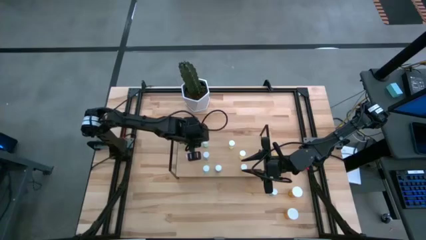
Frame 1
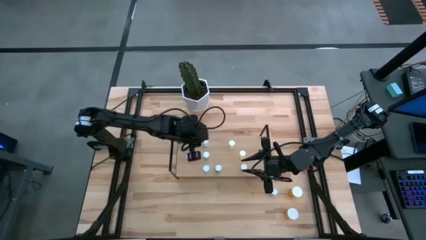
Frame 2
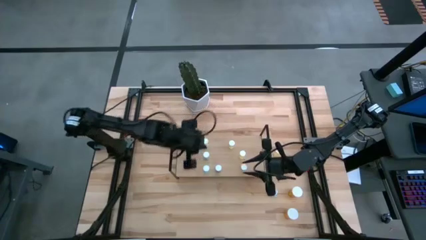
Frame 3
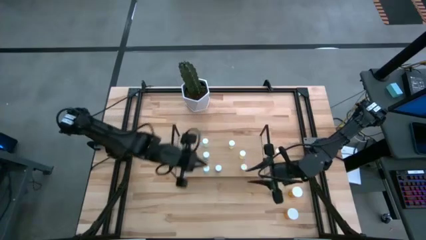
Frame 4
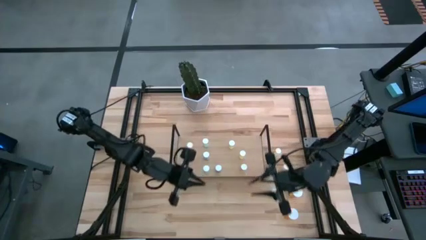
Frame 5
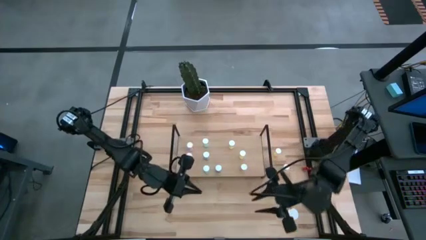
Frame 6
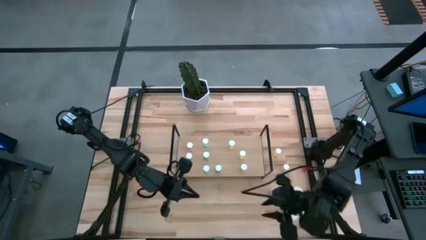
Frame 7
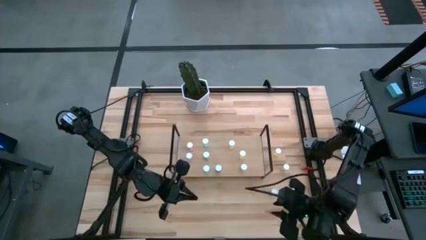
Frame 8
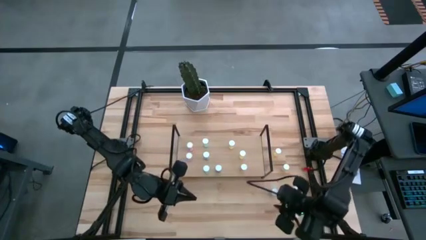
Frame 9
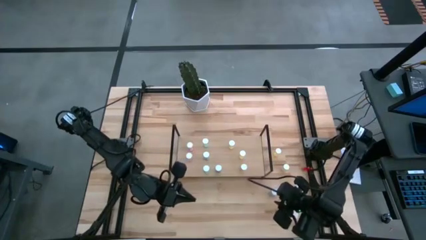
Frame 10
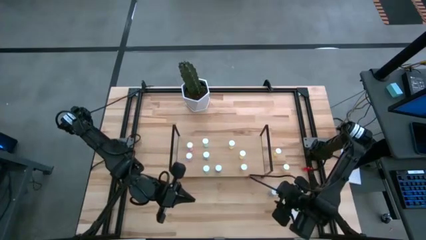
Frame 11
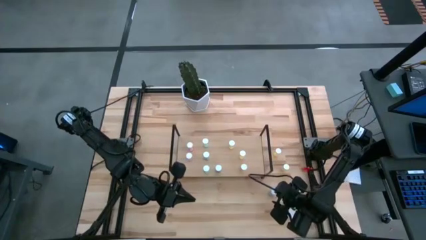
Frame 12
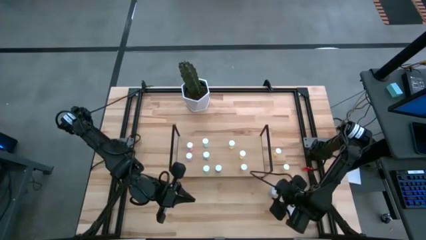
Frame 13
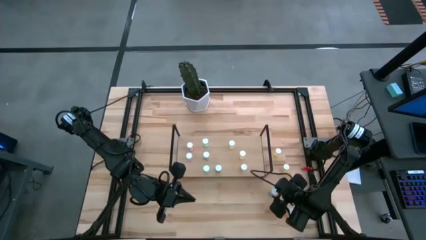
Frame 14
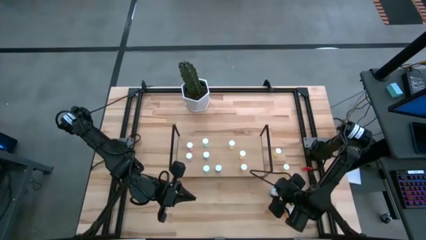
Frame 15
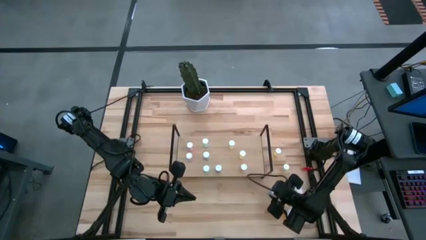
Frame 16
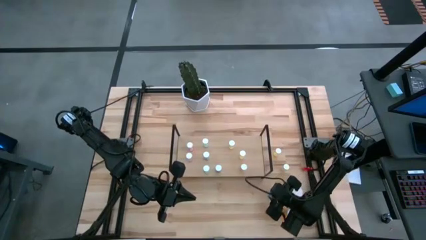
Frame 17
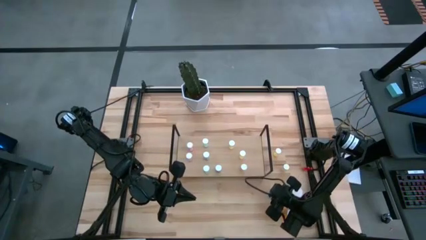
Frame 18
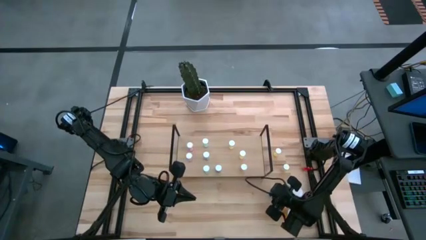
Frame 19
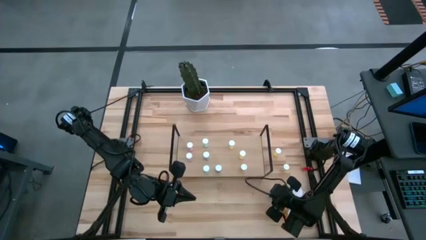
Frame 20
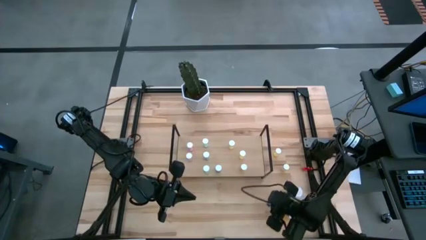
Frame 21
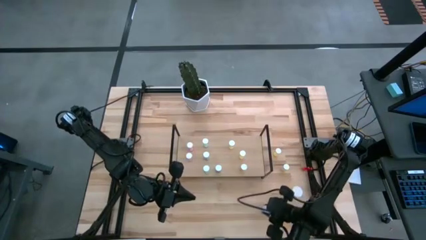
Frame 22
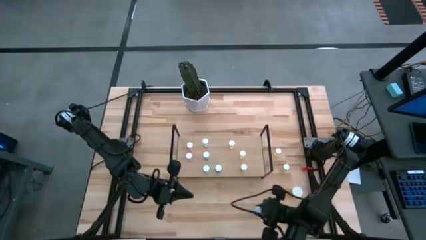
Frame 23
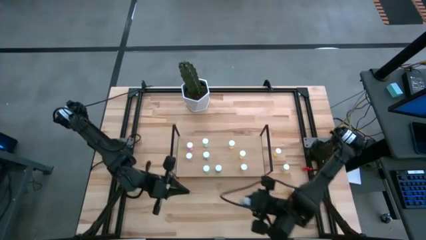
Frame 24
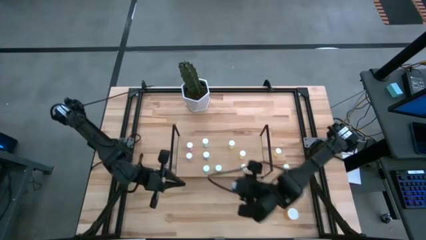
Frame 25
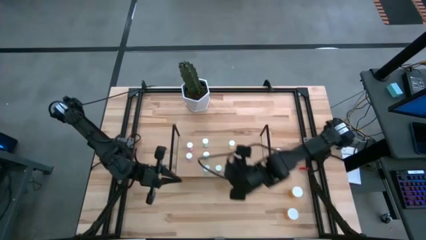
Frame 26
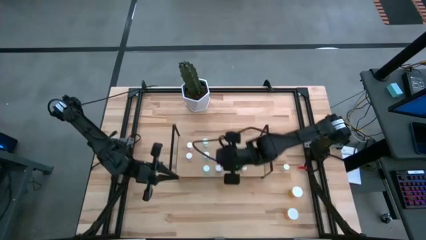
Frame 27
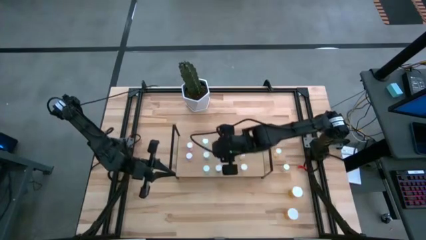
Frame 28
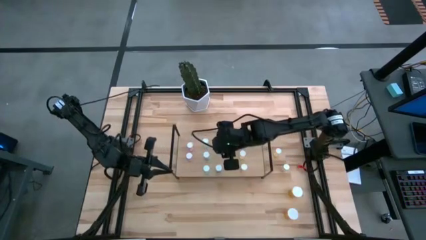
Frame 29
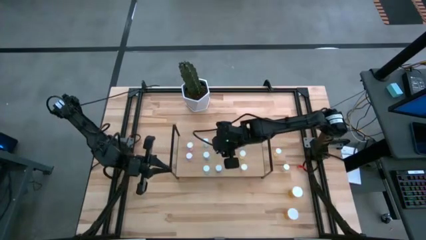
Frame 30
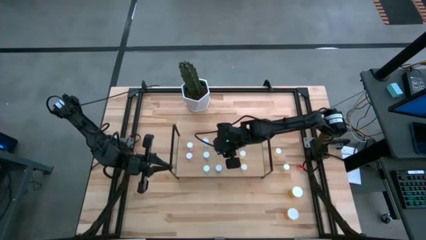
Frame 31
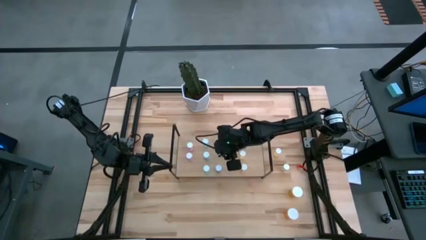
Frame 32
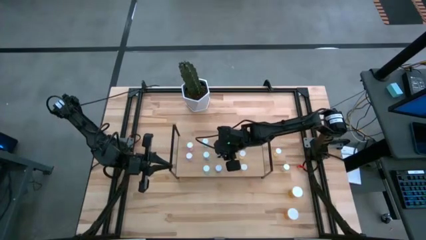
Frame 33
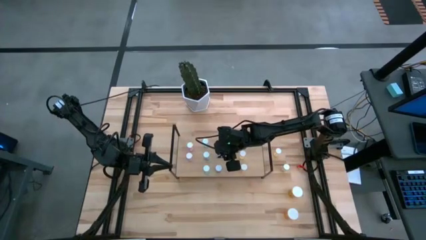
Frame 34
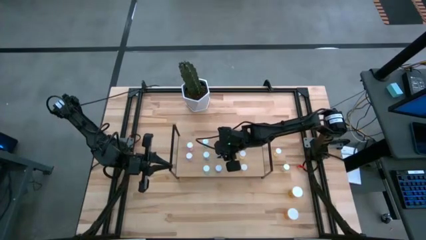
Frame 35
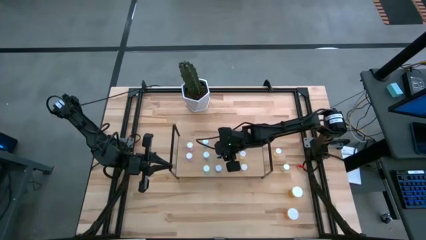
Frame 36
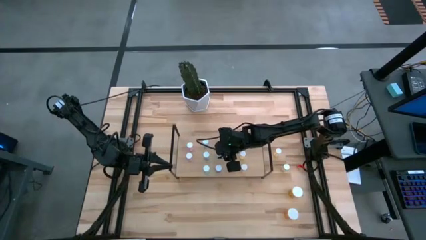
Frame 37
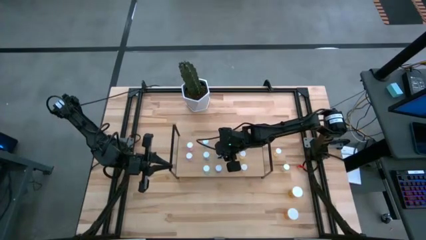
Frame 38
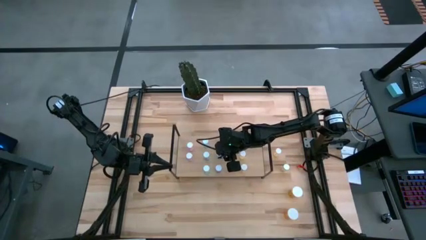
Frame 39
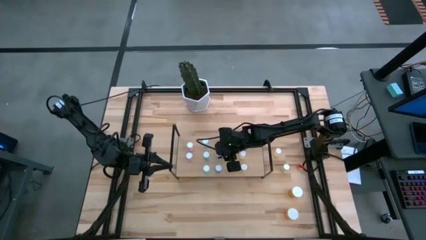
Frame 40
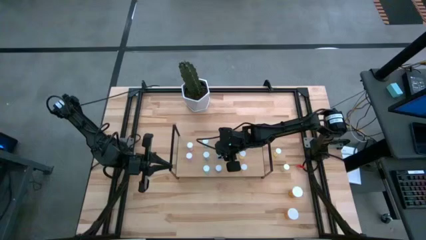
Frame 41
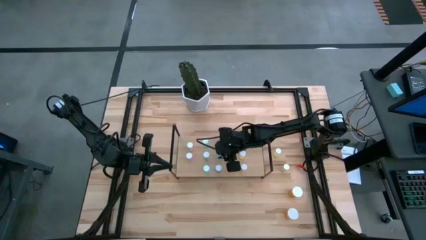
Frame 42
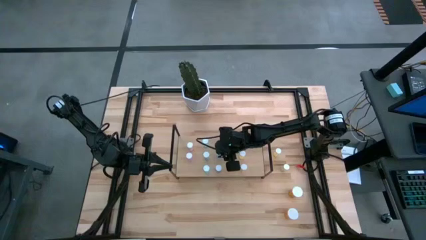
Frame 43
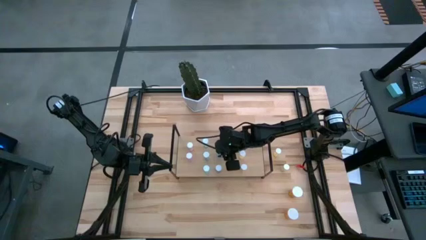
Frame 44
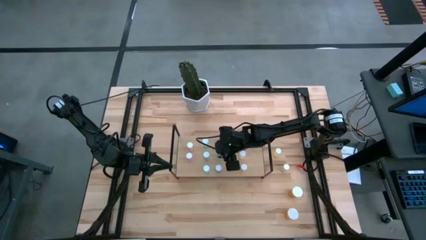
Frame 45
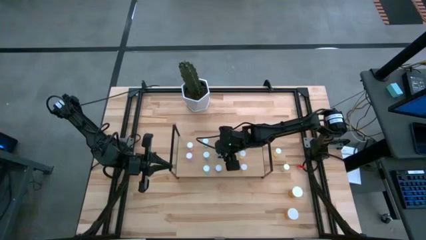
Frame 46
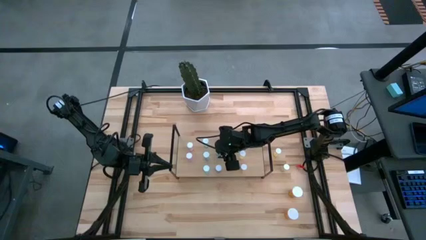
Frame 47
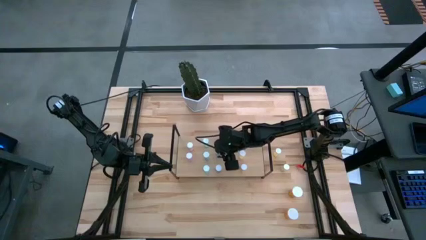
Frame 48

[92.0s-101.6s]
Task: Pick and place medicine bottles onto shelf by color
Put the blue pill bottle on the shelf aligned with the other blue pill bottle

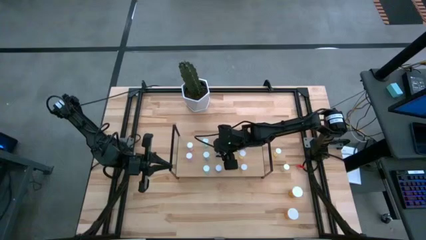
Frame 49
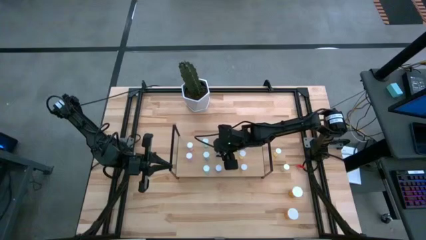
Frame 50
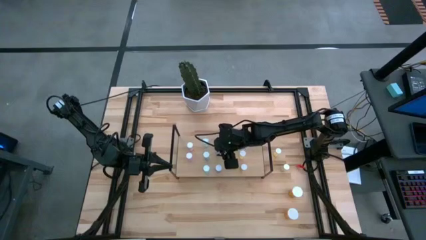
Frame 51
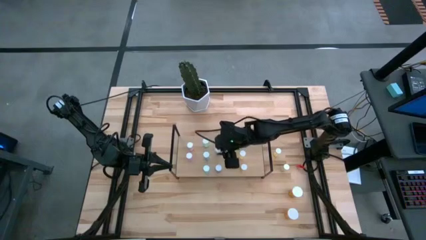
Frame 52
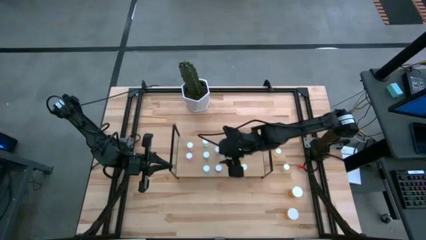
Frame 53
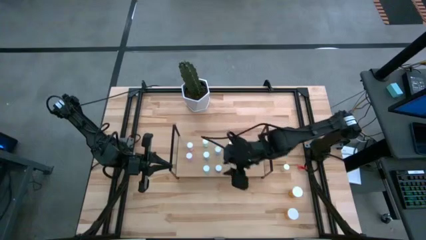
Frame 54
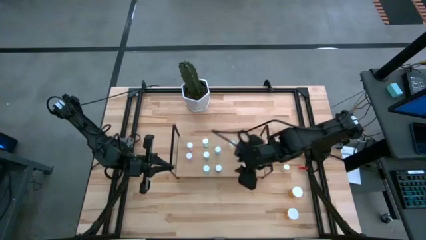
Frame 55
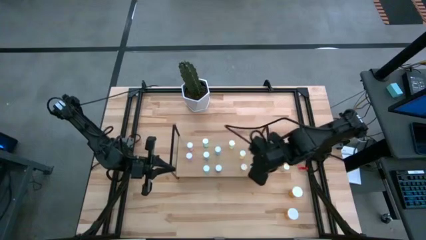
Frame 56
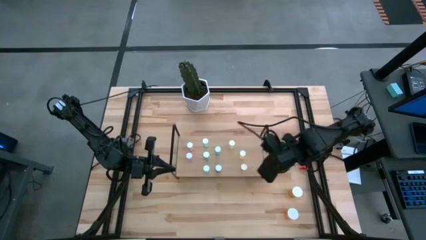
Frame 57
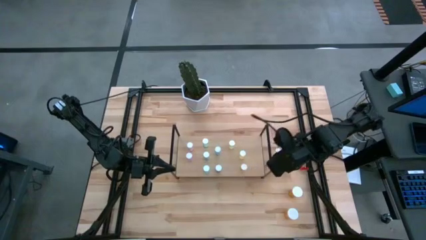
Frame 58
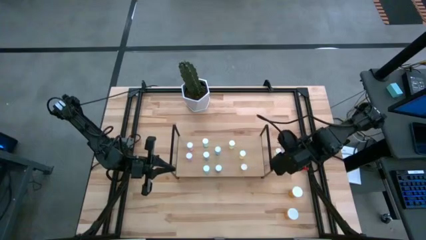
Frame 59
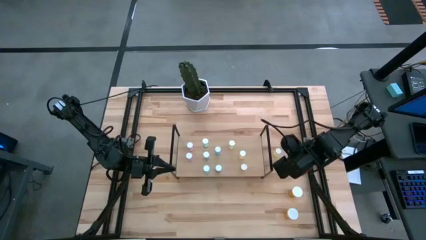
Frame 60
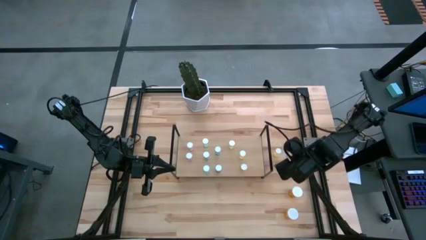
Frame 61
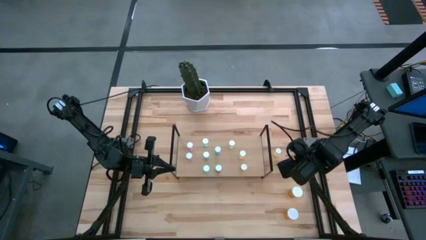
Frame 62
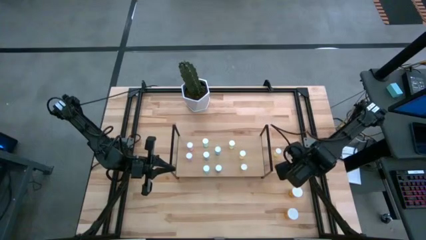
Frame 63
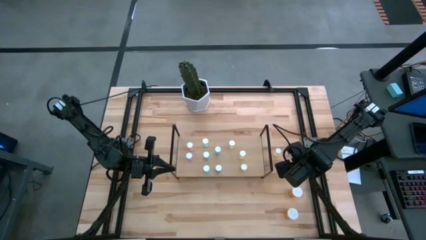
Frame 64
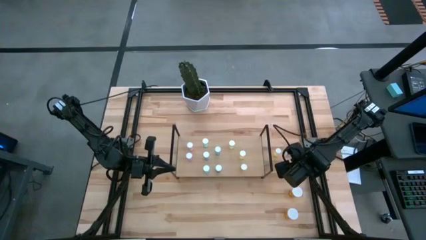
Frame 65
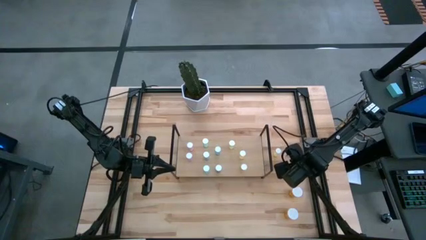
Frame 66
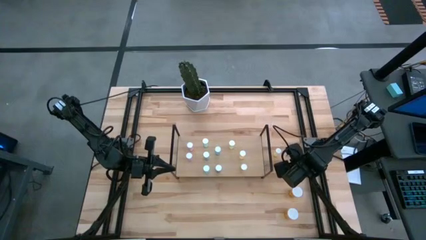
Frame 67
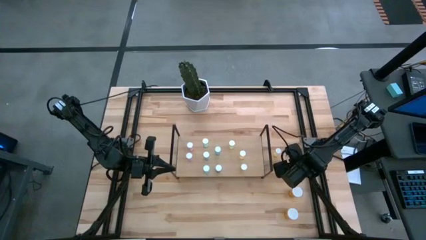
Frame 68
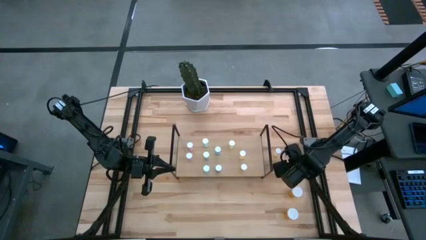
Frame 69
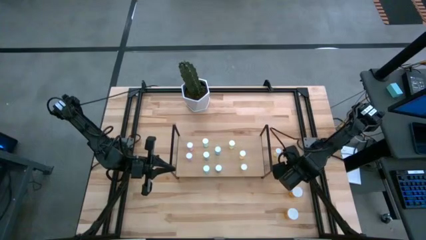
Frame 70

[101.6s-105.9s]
Put the yellow pill bottle on the shelf aligned with the other yellow pill bottle
